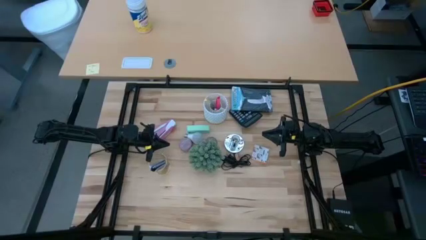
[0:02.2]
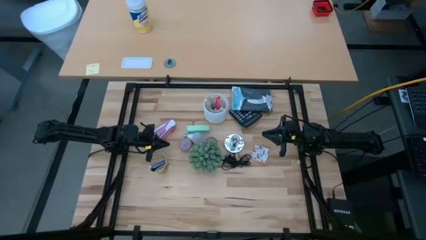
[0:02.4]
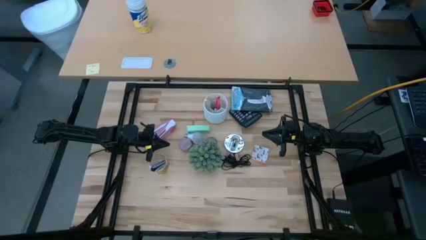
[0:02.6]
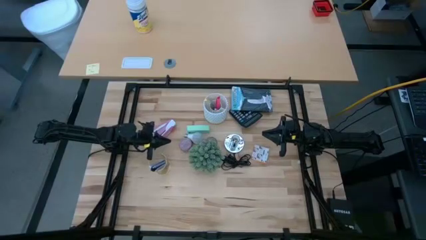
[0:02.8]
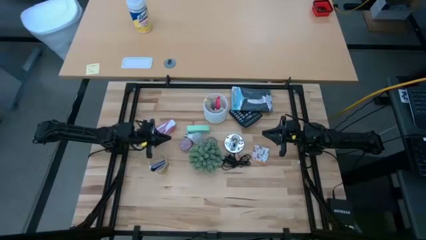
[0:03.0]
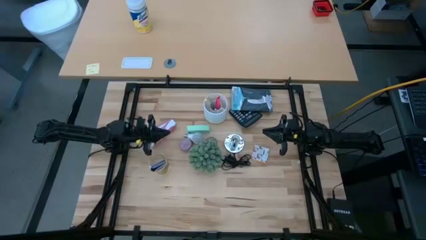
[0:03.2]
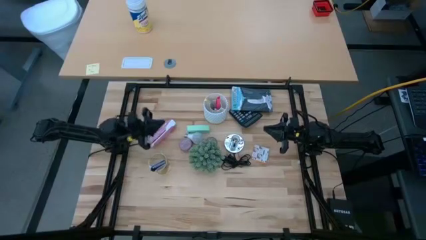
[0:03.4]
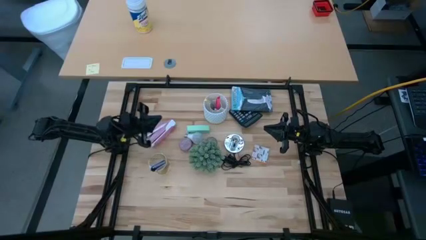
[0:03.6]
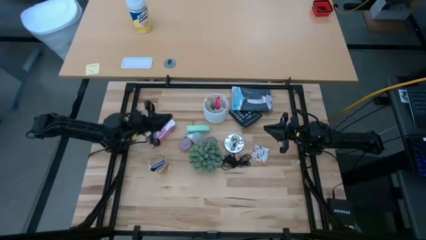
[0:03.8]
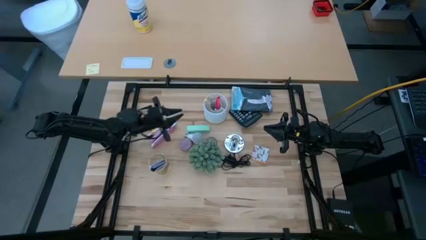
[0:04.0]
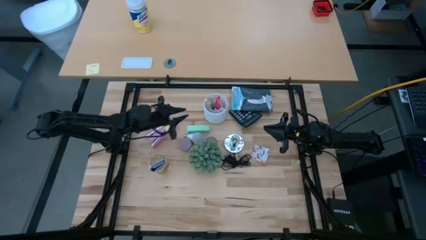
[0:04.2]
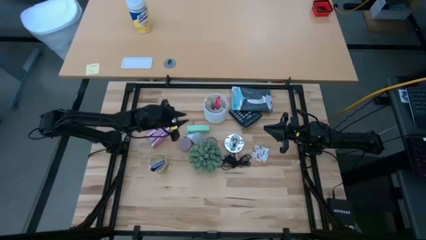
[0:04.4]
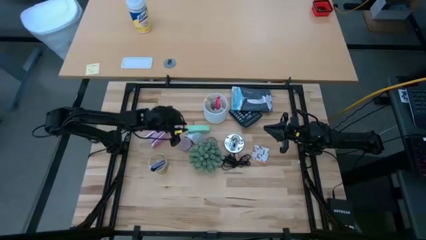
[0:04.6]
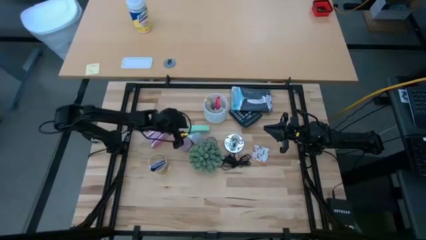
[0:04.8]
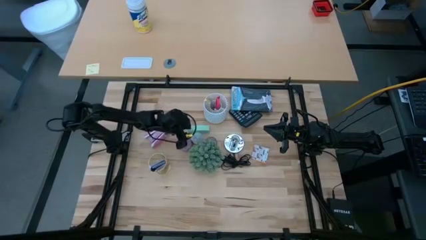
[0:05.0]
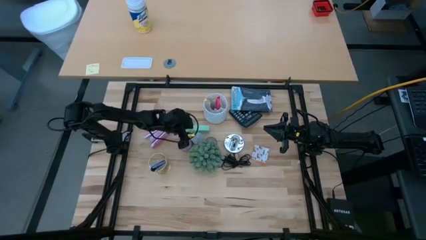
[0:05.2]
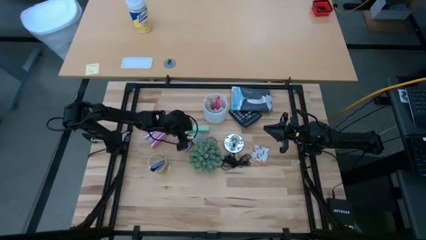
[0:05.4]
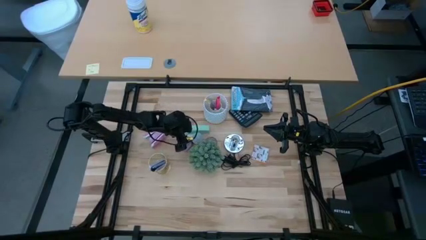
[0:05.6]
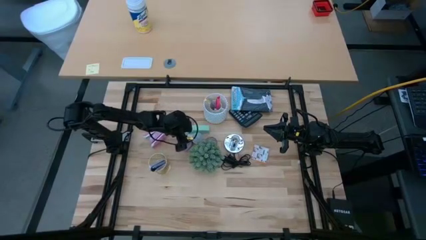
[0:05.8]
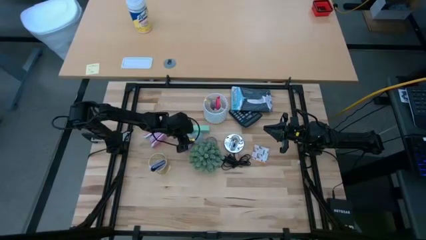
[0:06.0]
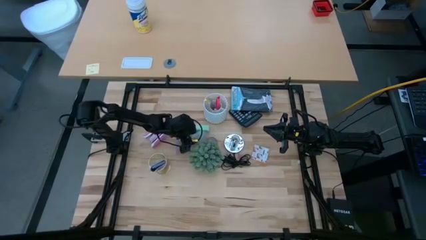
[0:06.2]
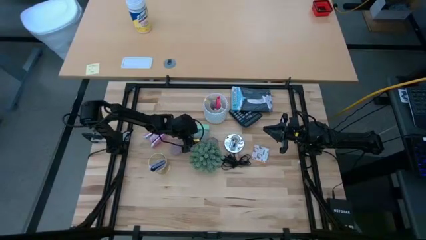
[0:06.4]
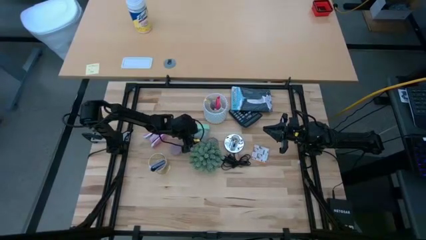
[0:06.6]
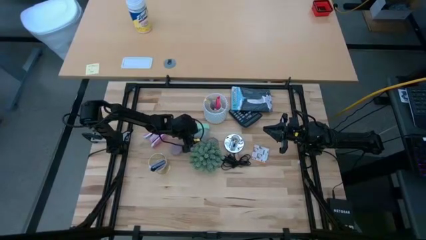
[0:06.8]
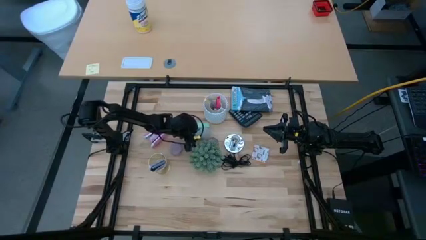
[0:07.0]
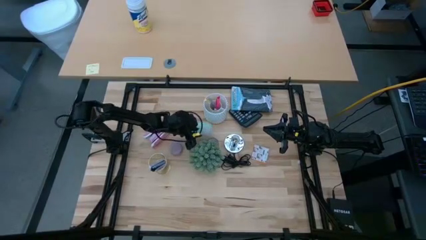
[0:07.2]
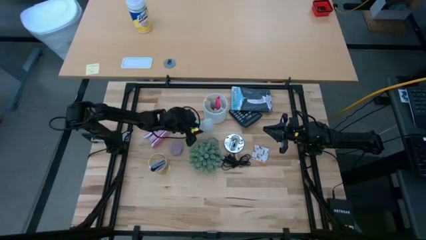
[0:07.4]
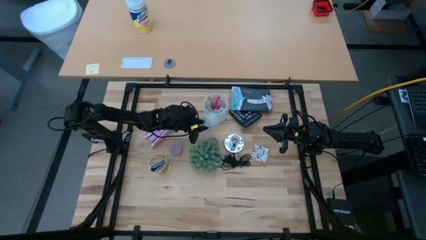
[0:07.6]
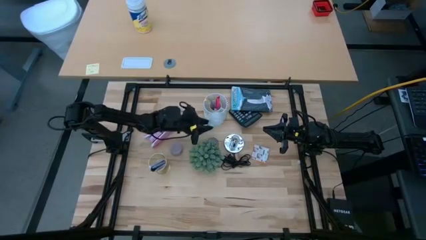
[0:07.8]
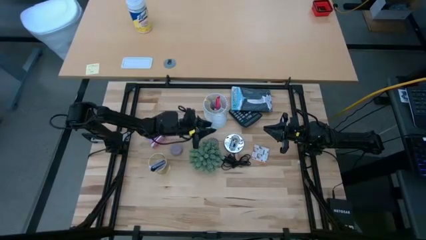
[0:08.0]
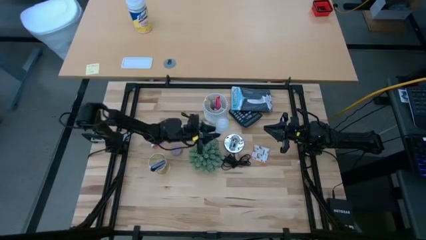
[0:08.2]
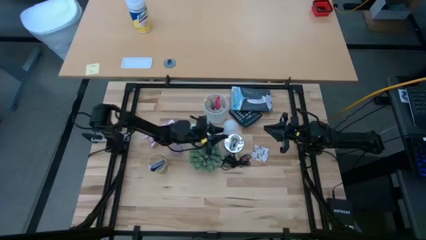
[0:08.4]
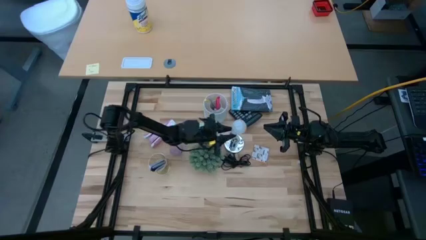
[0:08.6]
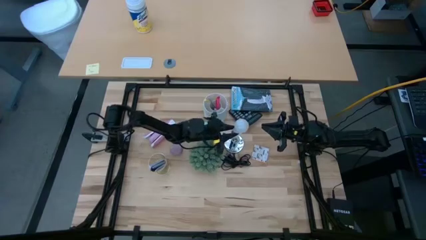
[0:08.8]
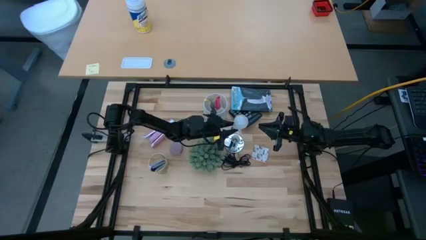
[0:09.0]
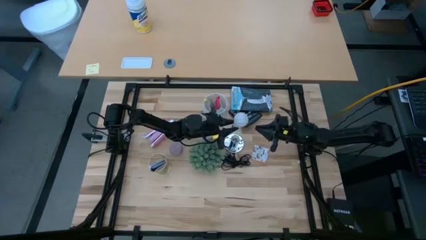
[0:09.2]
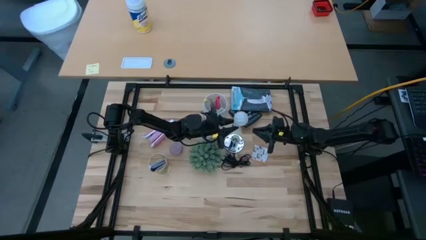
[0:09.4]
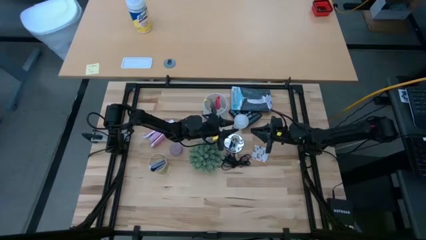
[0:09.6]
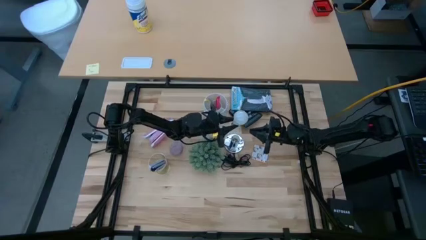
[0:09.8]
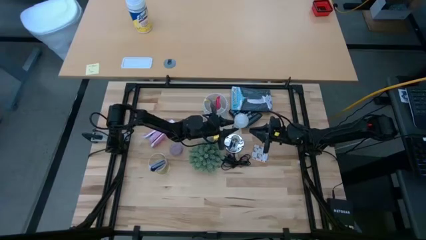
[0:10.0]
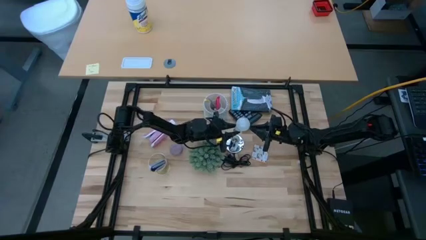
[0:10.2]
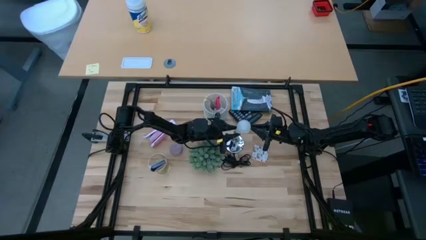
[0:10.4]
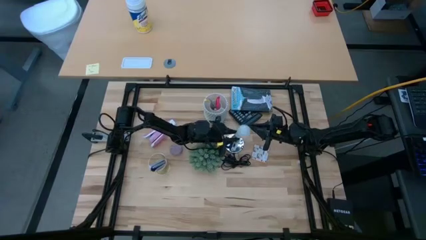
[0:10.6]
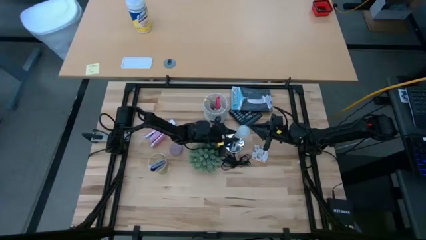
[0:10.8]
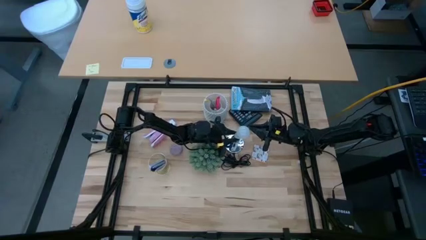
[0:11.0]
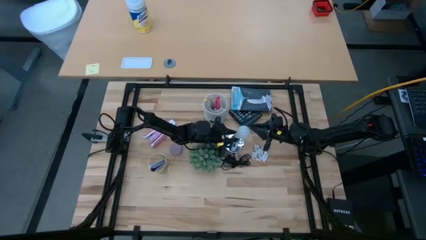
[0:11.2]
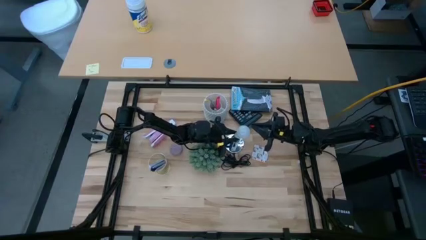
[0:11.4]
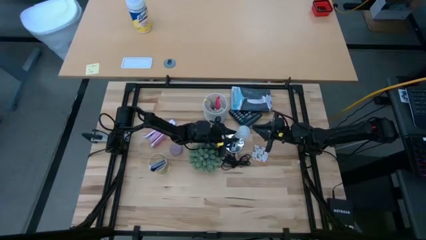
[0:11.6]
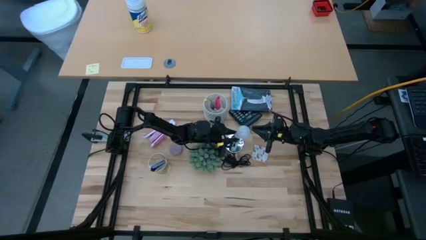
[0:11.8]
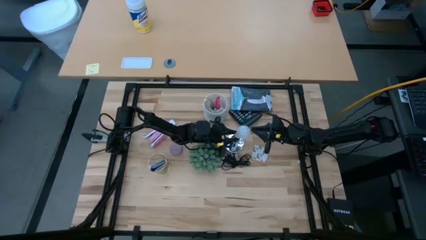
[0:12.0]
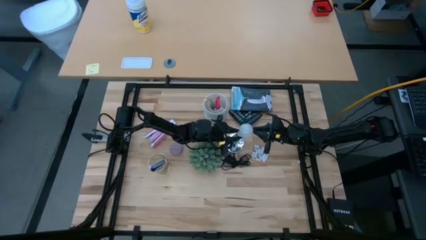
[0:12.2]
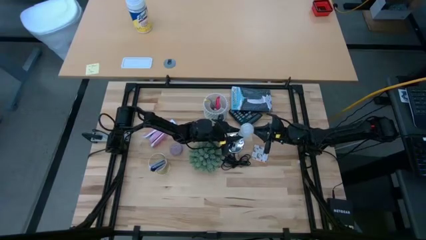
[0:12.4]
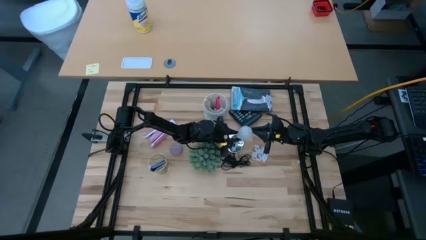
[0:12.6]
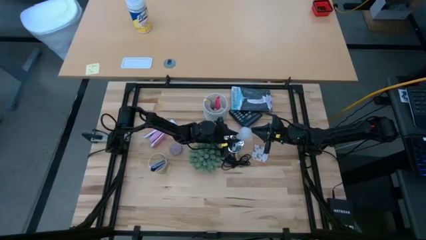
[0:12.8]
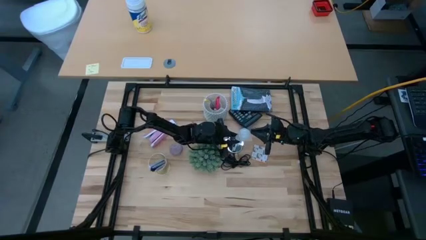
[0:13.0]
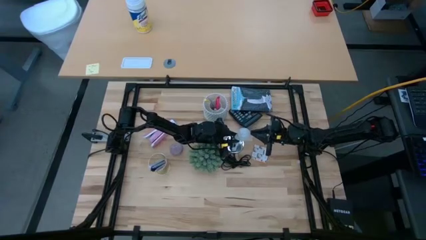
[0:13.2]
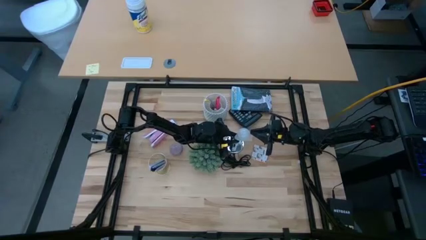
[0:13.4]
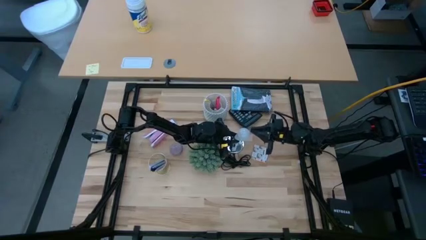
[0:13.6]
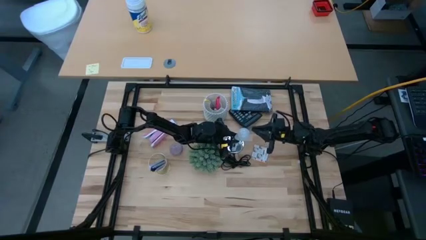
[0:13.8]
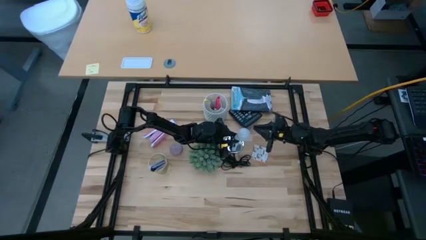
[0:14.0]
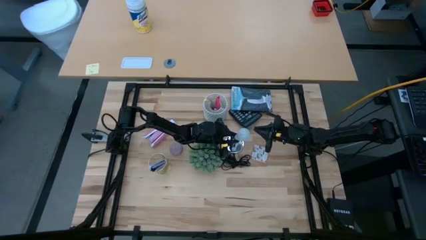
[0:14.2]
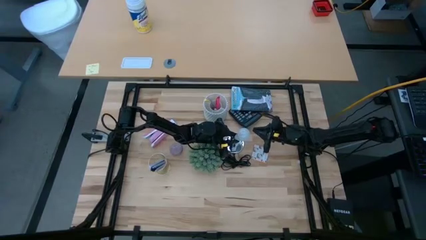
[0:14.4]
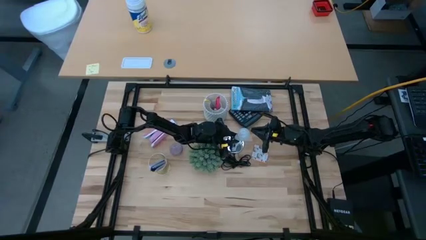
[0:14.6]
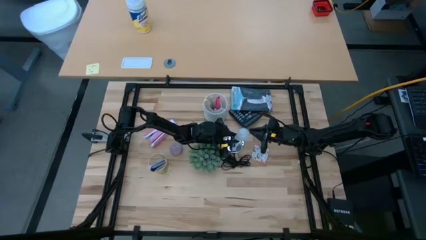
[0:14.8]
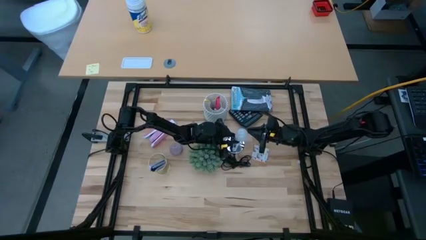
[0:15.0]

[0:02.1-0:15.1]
Task: Screw lightbulb
Insert the lightbulb into the silver desk lamp
